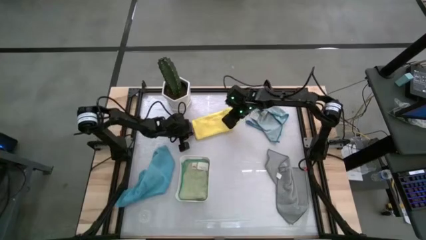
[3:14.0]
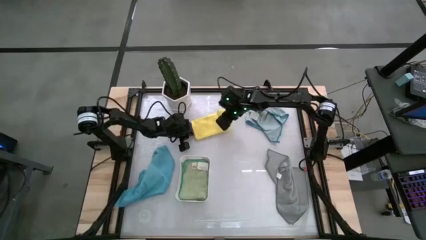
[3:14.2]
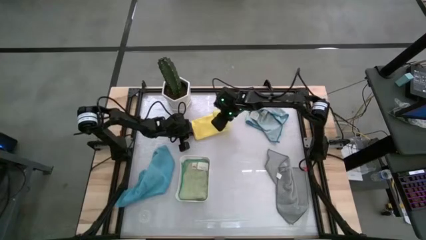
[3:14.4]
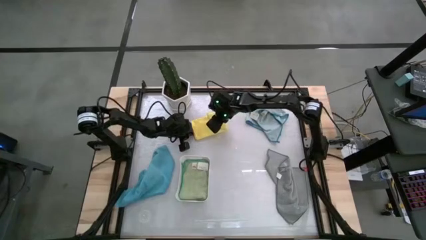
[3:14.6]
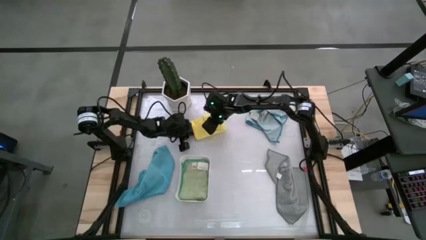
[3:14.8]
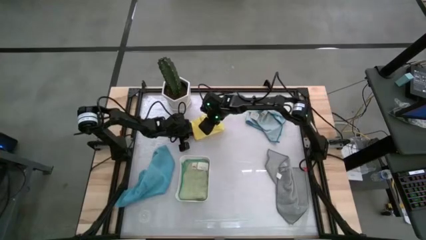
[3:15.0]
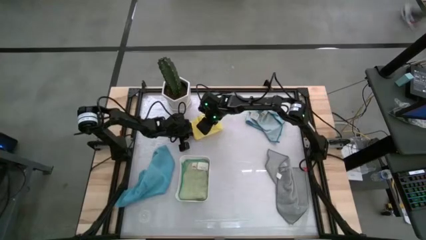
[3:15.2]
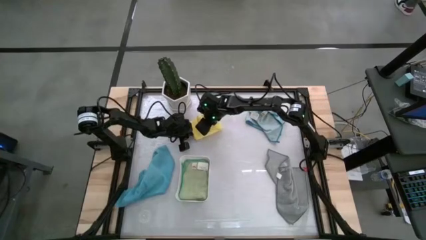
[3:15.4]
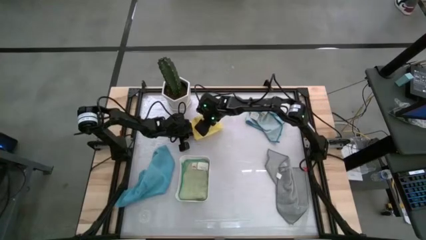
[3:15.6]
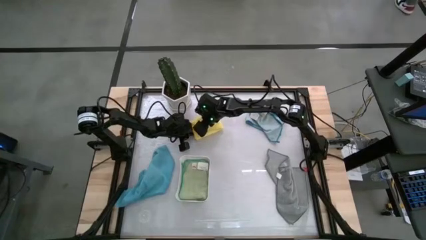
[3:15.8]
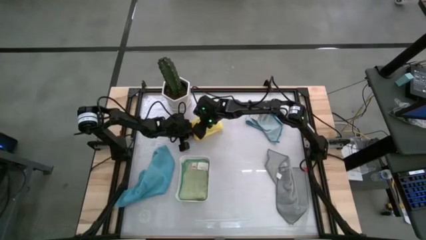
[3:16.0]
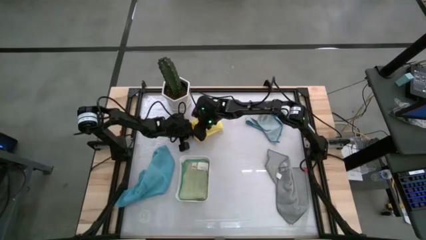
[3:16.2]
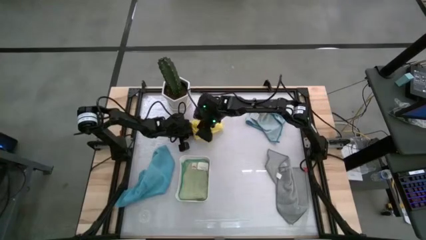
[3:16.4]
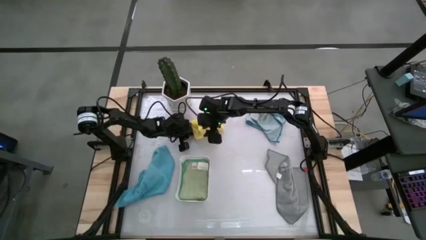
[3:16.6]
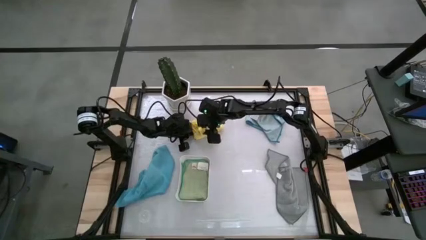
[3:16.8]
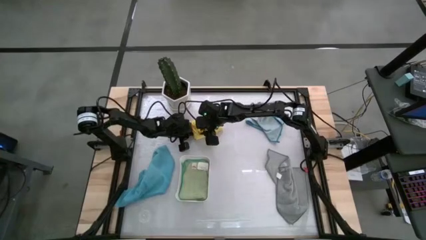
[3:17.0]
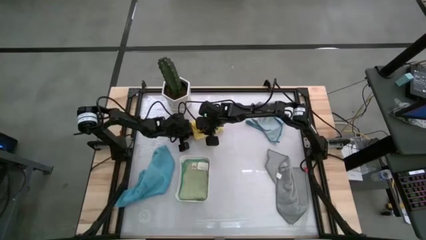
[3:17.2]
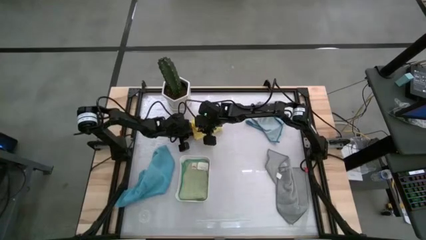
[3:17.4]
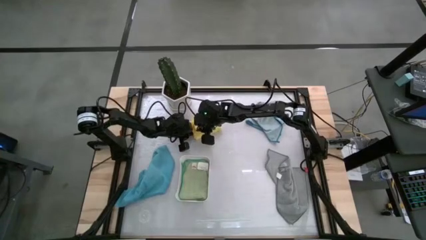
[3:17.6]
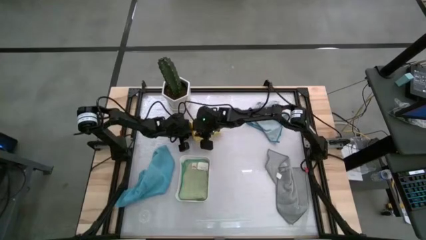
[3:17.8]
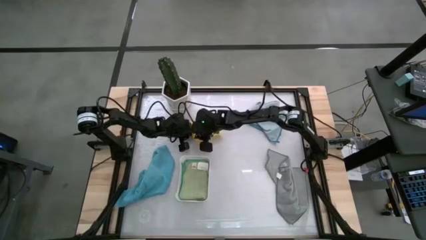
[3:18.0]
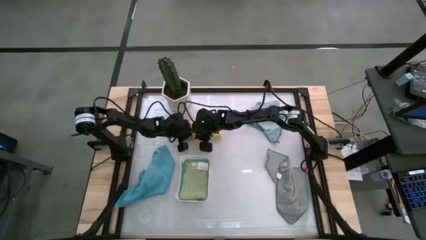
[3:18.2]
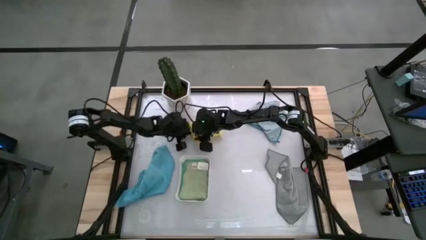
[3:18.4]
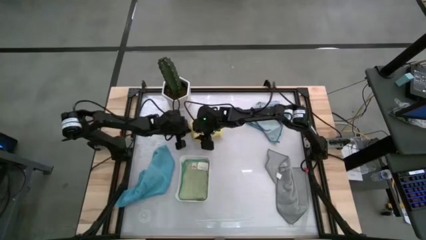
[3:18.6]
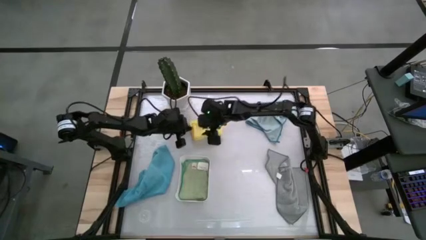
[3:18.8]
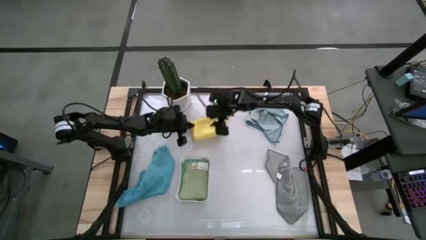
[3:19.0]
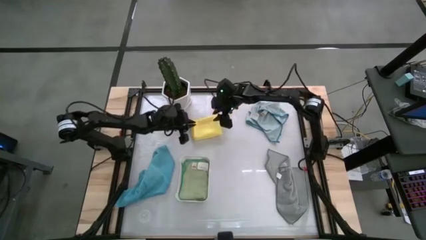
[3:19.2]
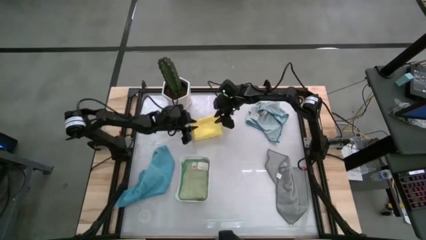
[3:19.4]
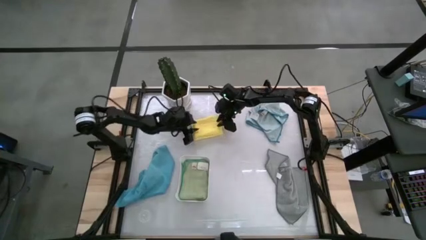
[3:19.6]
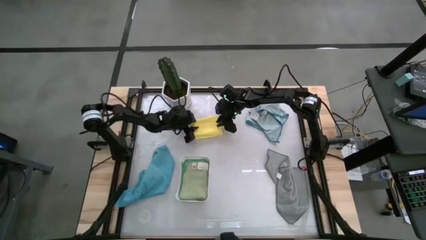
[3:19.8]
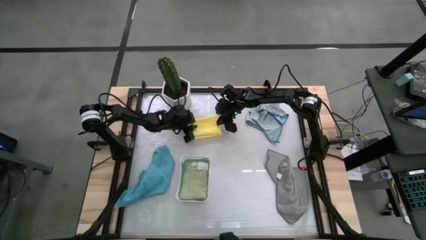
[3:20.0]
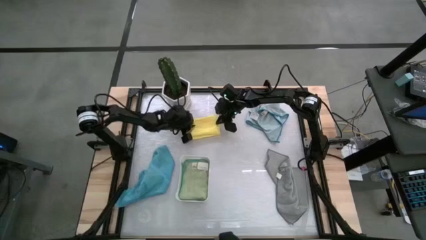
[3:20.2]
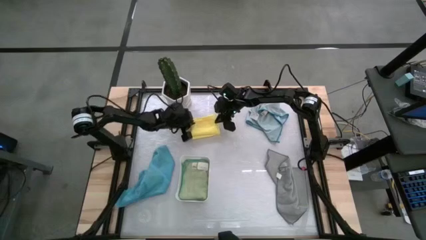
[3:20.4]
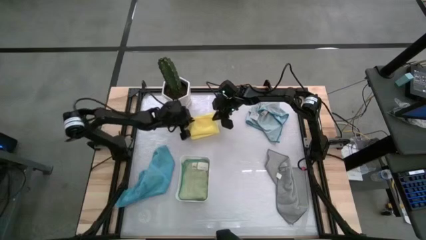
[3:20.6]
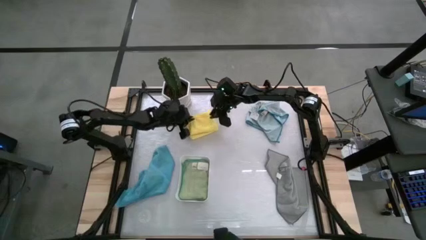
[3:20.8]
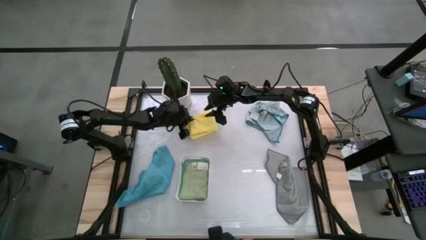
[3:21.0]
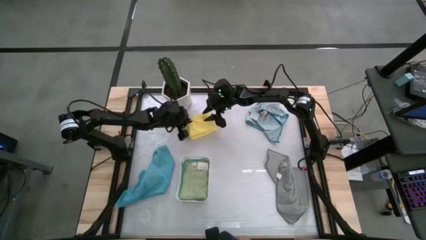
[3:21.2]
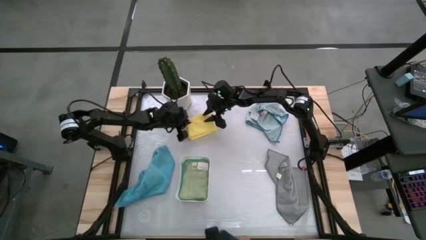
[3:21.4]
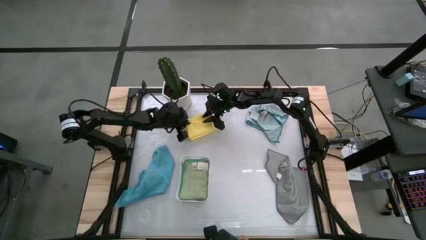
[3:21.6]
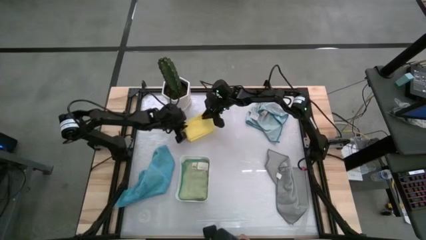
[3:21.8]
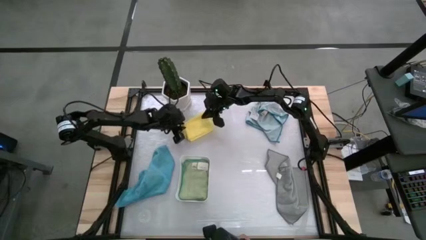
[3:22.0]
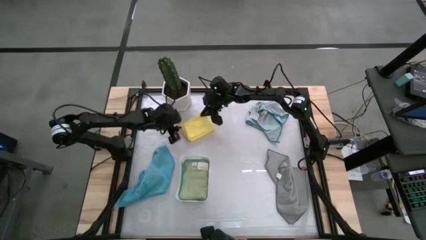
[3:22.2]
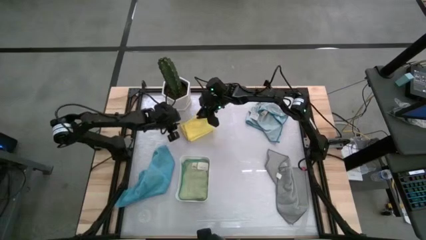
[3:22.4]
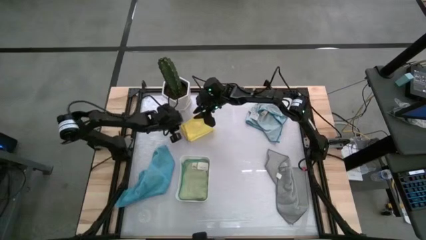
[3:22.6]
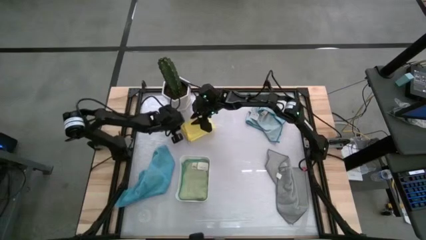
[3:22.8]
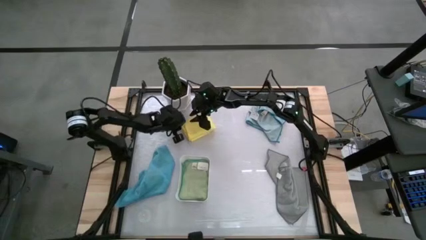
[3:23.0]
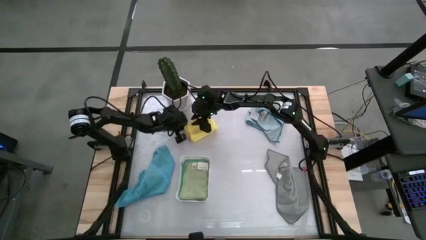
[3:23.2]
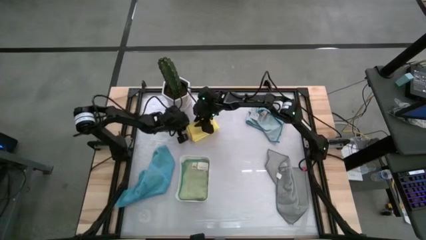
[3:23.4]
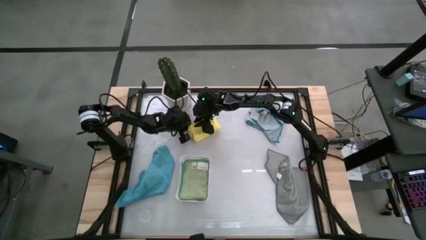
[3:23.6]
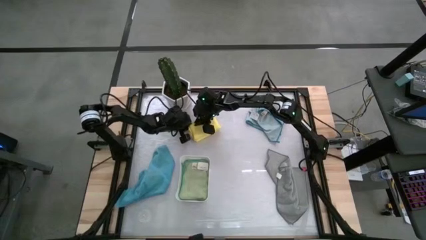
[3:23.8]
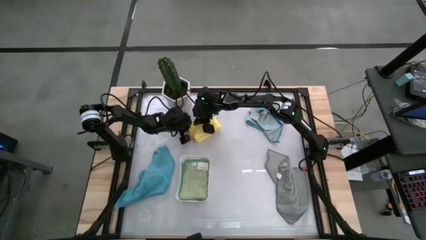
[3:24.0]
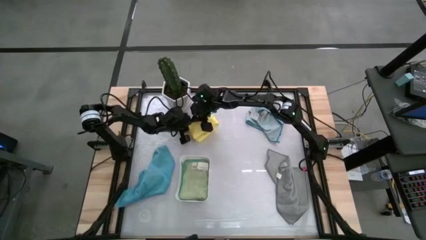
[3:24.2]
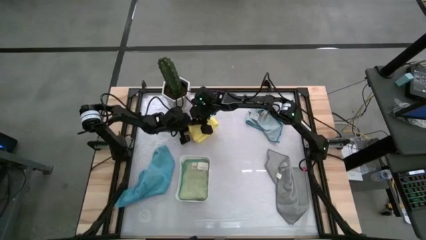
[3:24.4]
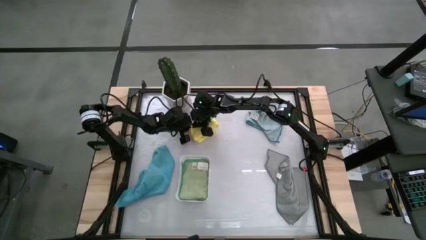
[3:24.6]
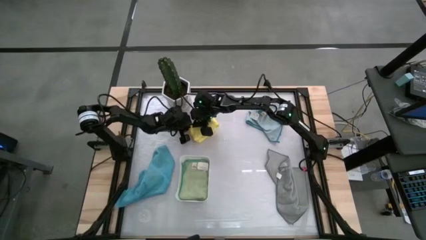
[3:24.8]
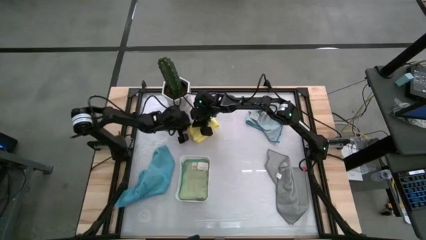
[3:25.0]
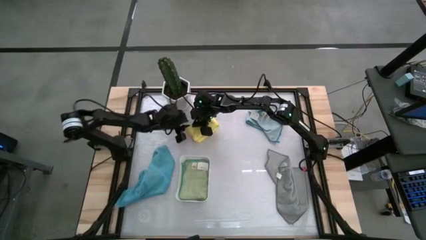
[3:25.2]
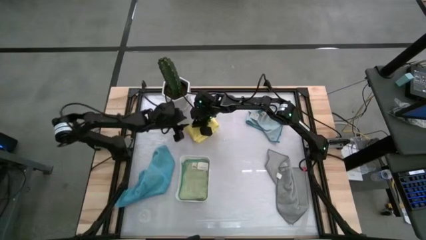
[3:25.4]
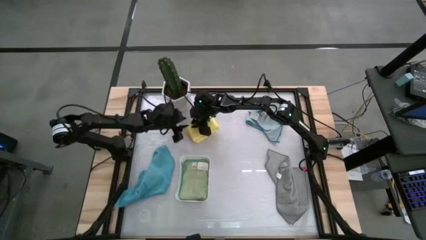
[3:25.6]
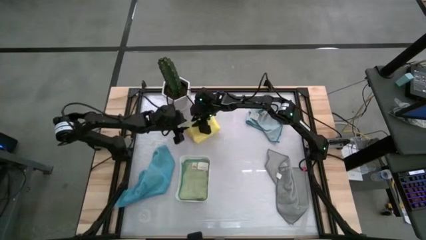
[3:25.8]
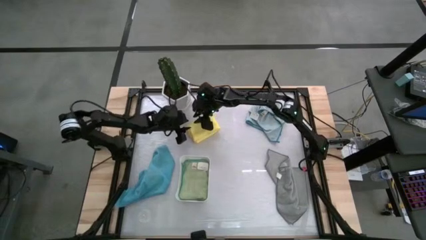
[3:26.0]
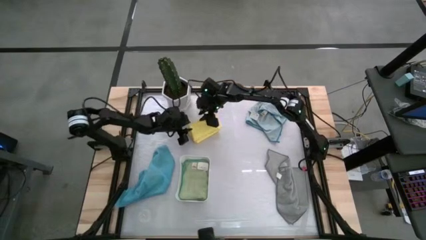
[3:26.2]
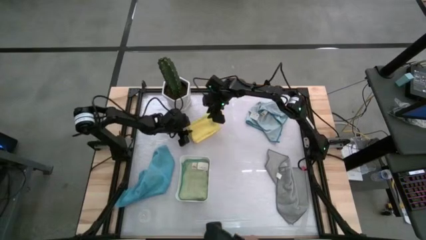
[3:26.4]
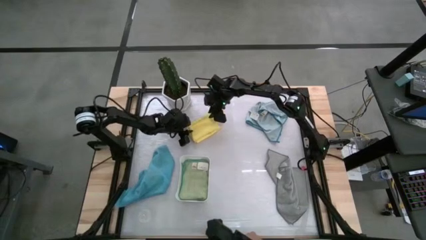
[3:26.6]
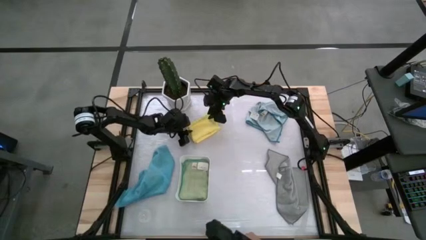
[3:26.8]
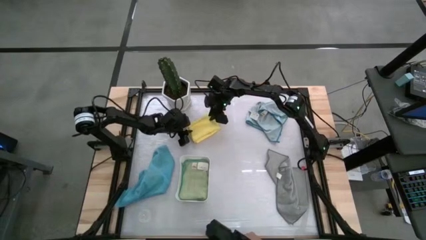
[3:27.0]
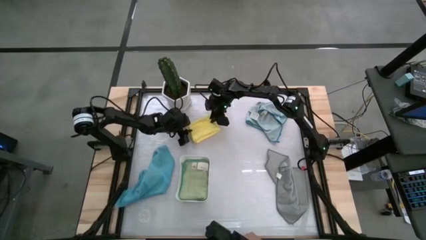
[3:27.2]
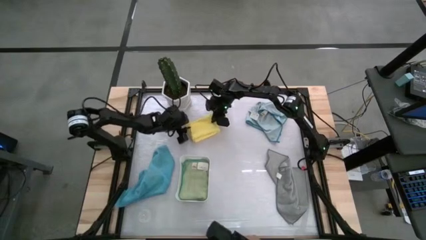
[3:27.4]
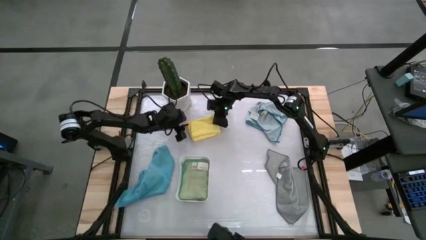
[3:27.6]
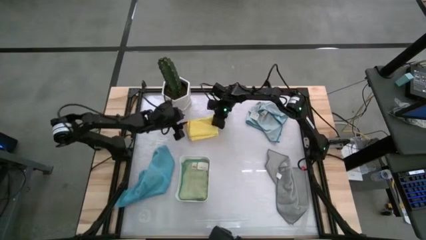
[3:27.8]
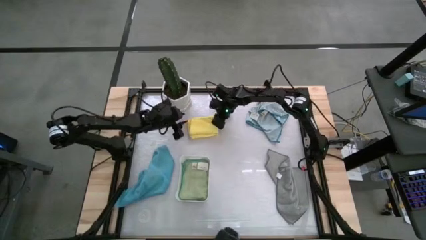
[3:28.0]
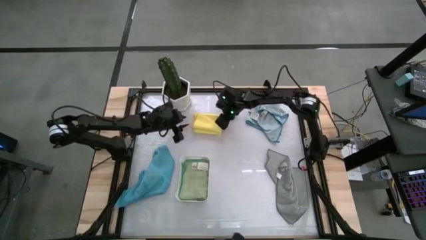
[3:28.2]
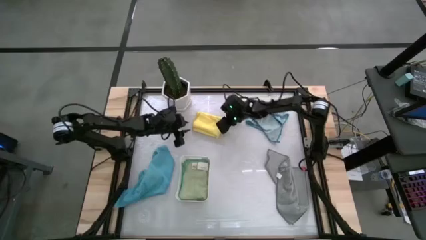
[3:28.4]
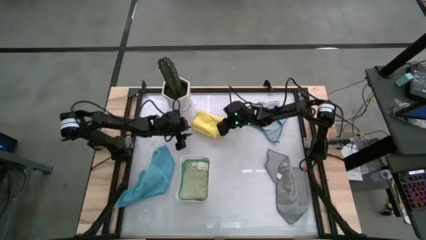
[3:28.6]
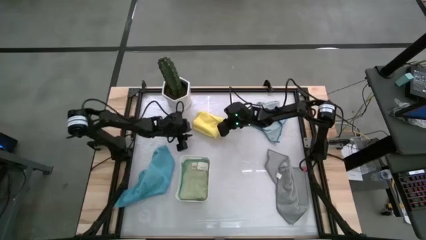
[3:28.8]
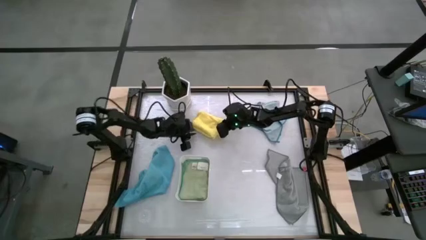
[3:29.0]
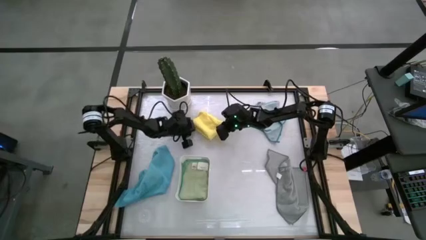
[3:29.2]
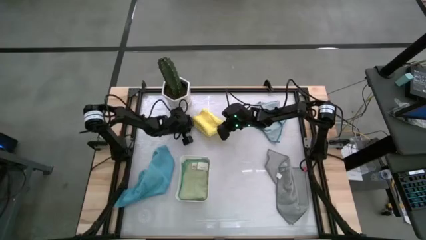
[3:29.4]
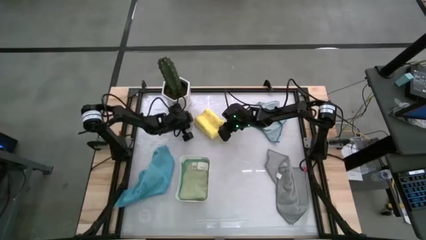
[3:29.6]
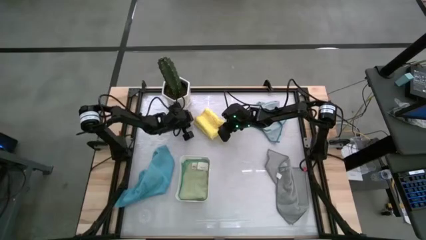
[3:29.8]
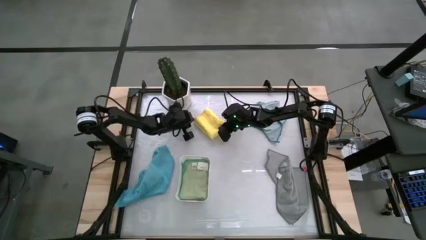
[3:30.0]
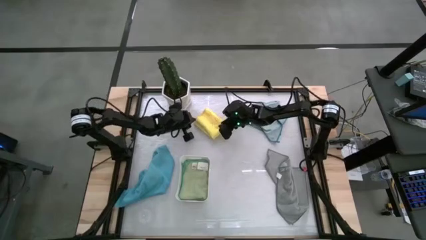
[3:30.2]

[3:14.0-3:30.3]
Task: Fold microfiber towels
Fold the yellow microfiber towel
